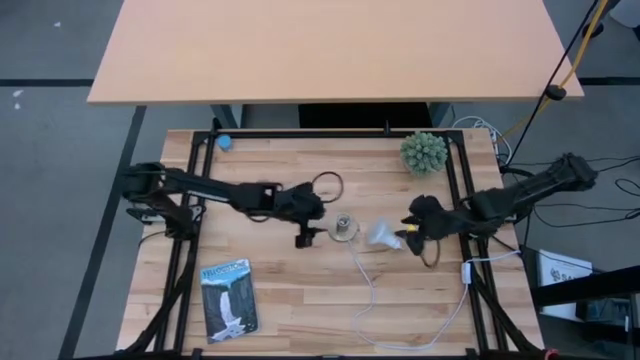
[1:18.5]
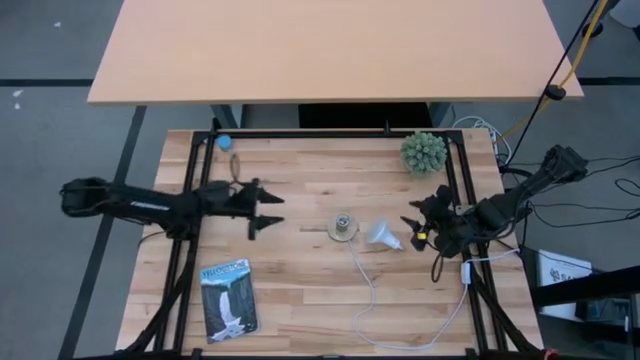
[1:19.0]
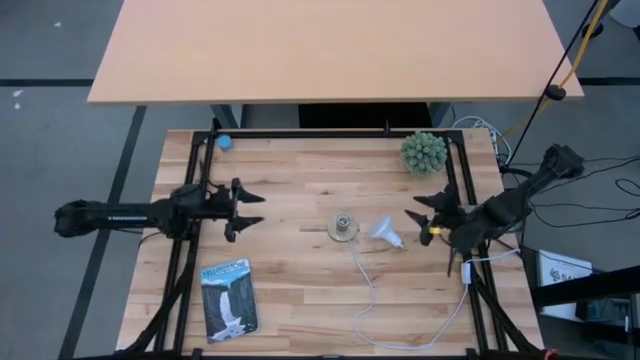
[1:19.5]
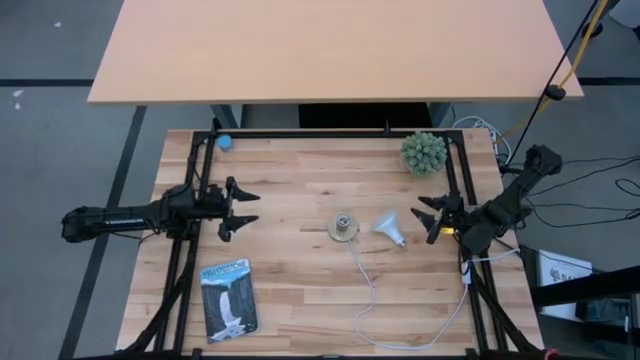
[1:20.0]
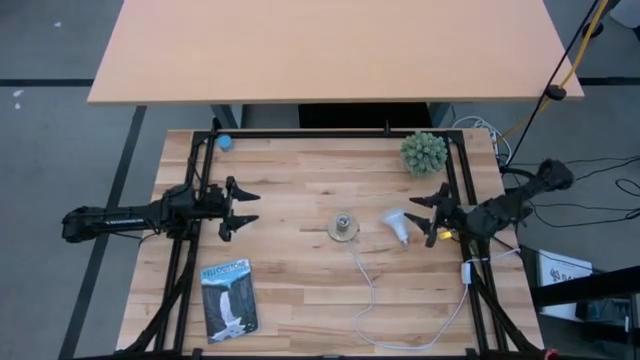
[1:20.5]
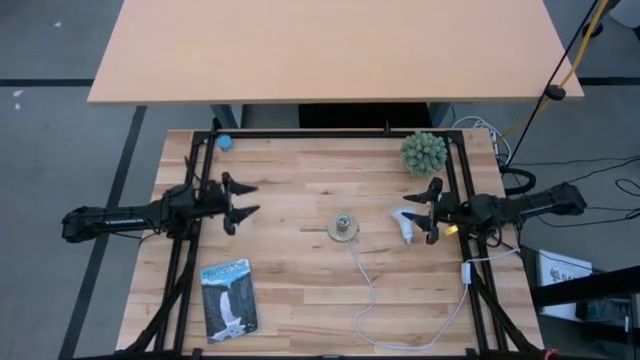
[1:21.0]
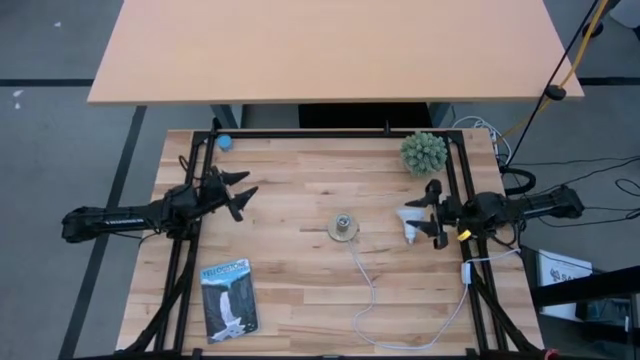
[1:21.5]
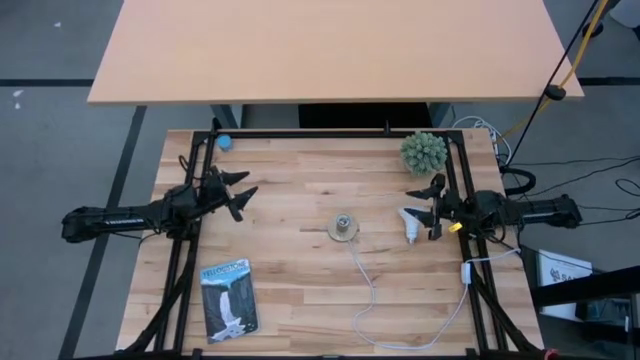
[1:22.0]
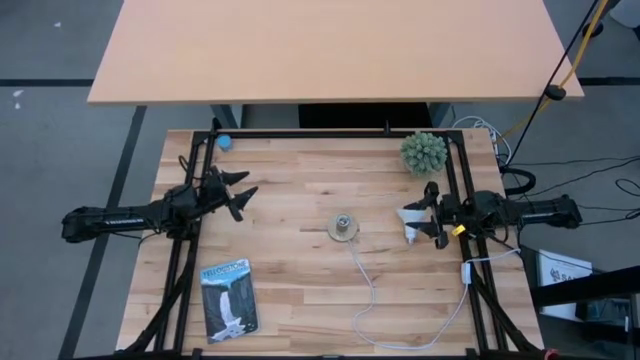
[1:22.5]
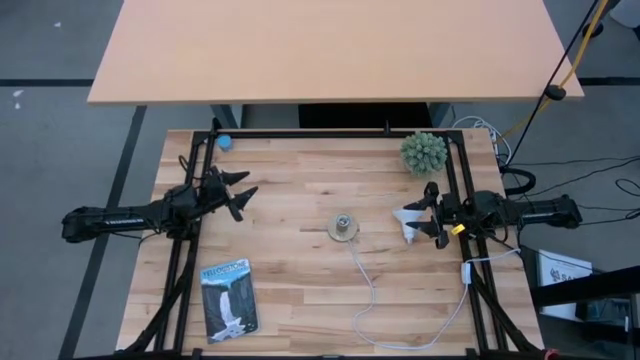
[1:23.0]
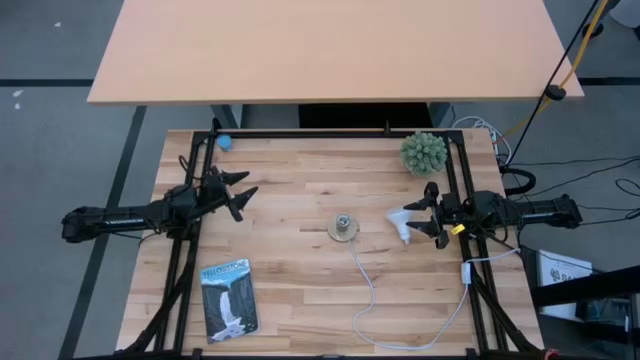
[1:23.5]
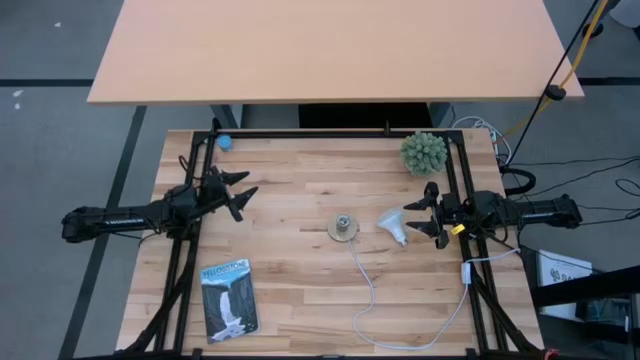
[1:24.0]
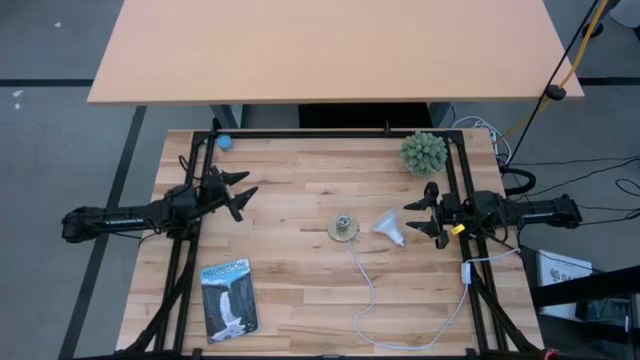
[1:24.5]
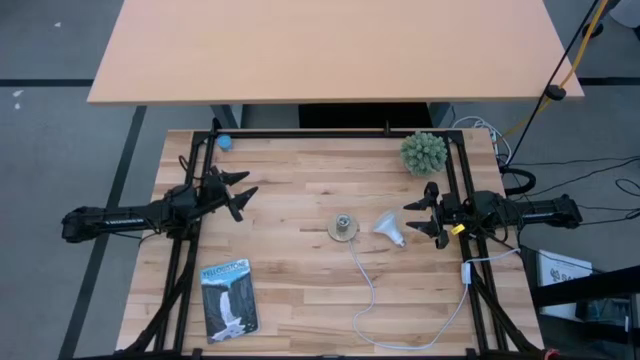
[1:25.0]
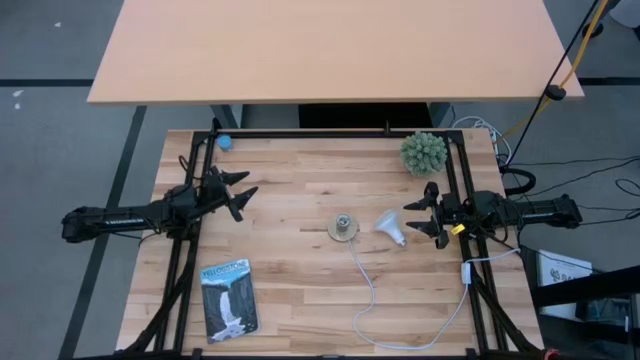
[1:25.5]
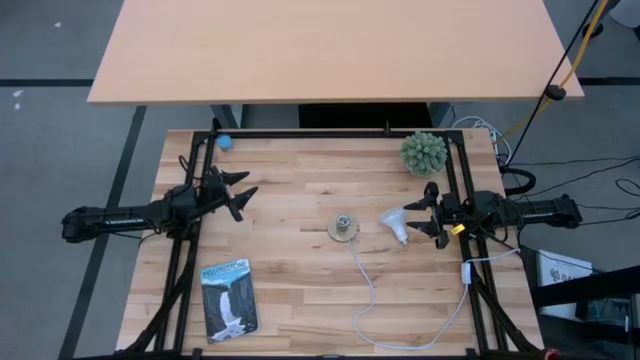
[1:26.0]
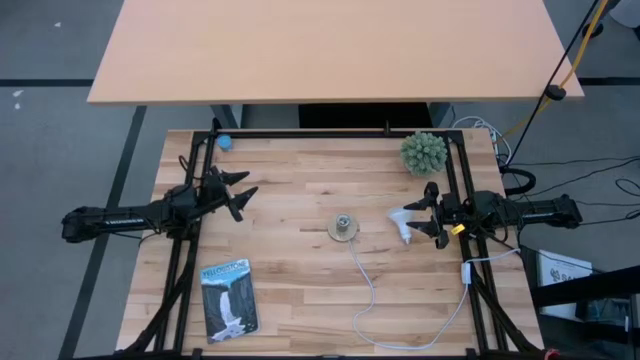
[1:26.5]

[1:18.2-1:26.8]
Task: Screw lightbulb
Return to Home Position

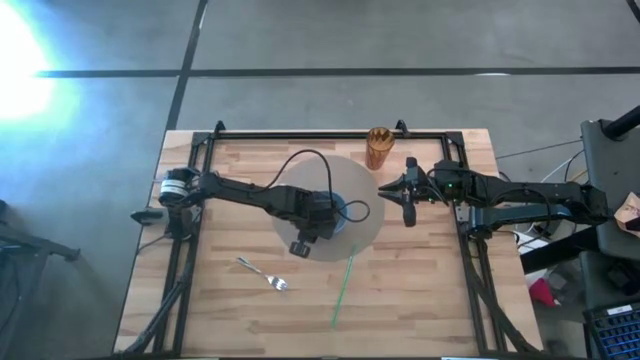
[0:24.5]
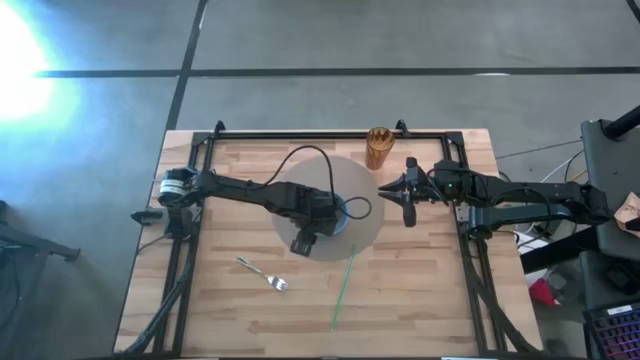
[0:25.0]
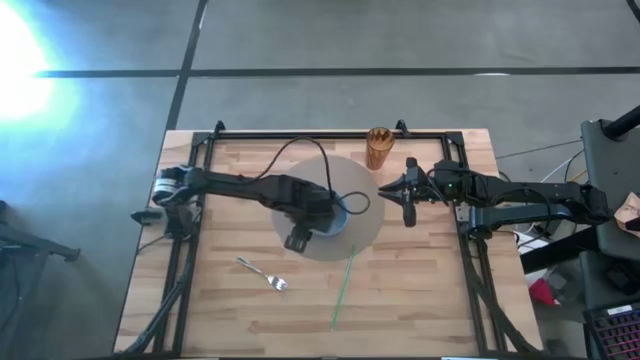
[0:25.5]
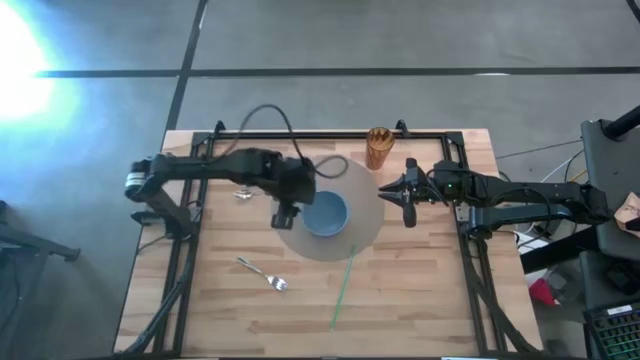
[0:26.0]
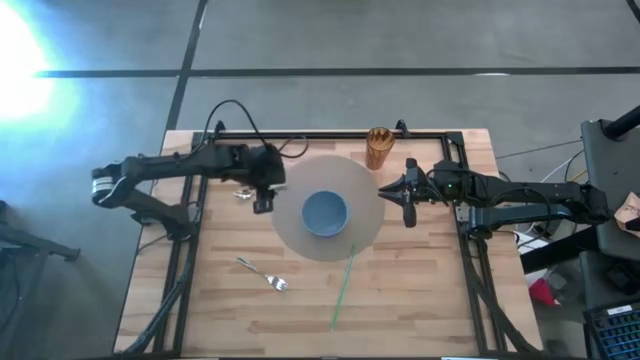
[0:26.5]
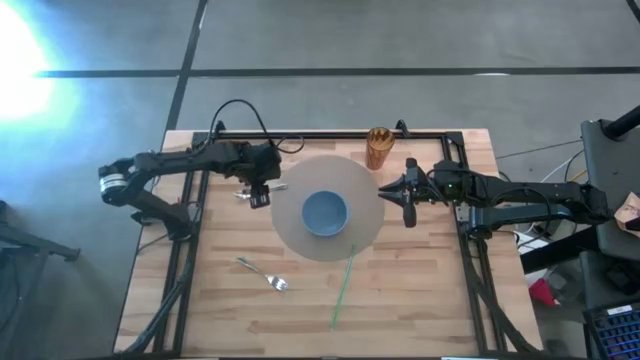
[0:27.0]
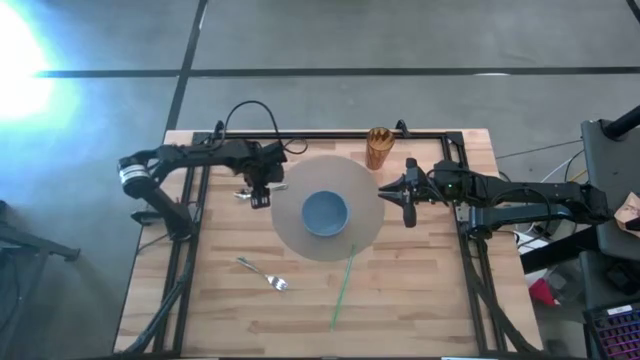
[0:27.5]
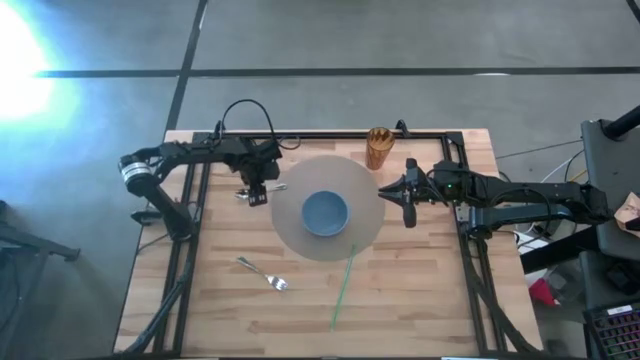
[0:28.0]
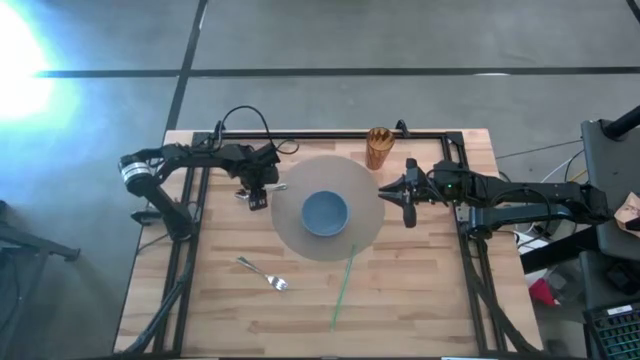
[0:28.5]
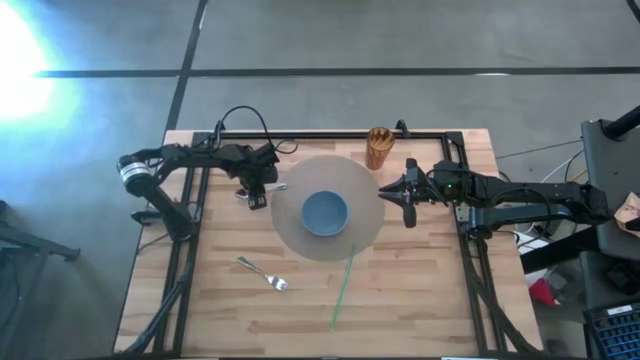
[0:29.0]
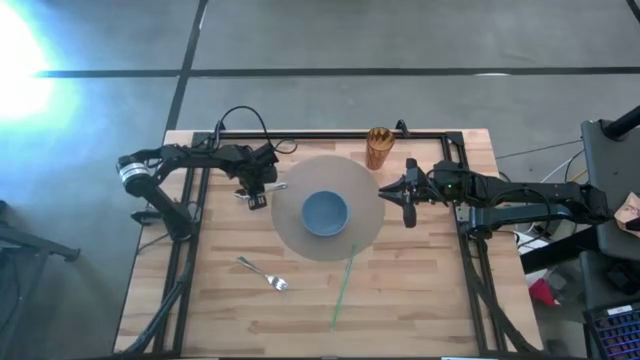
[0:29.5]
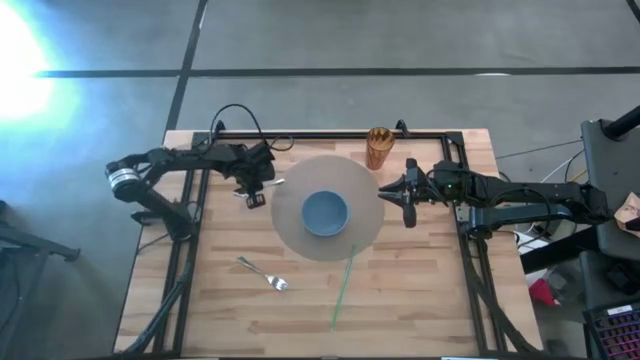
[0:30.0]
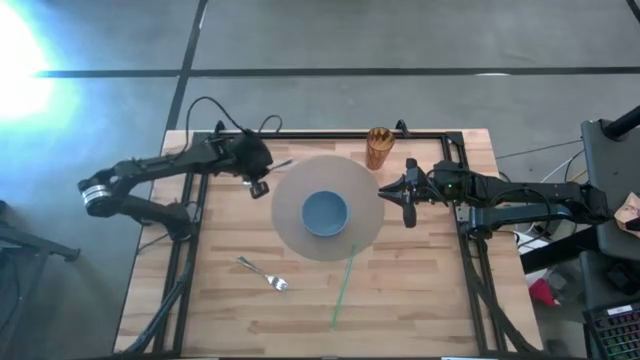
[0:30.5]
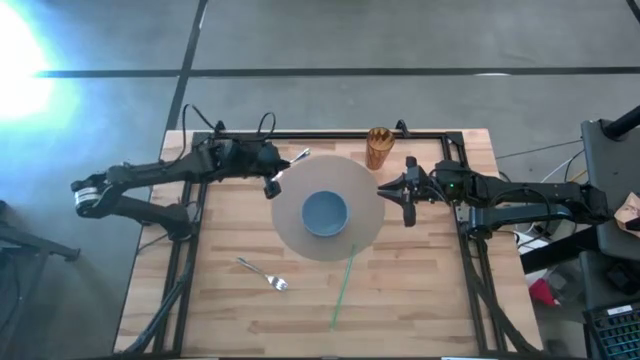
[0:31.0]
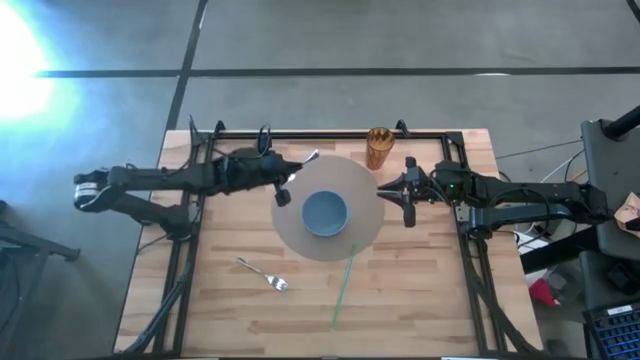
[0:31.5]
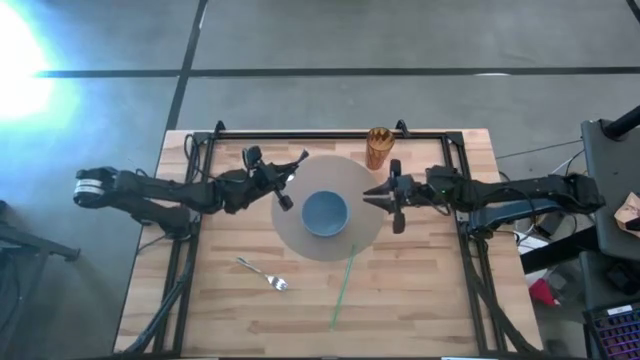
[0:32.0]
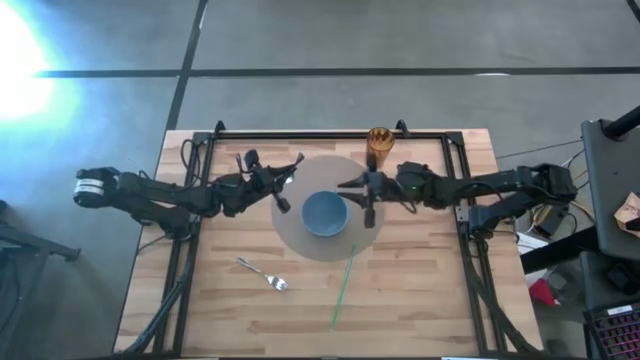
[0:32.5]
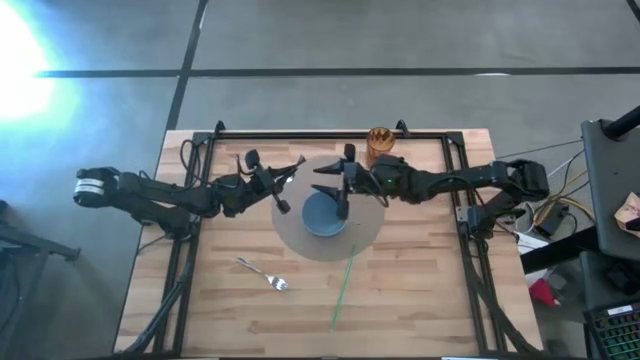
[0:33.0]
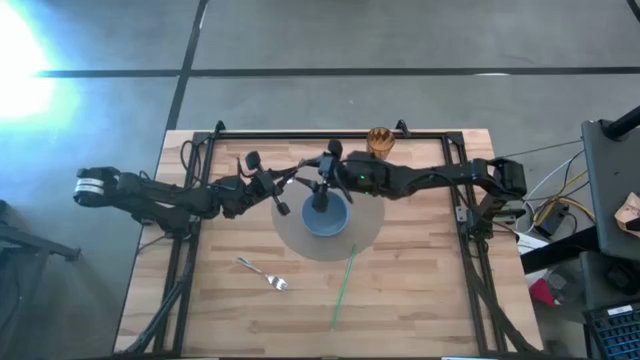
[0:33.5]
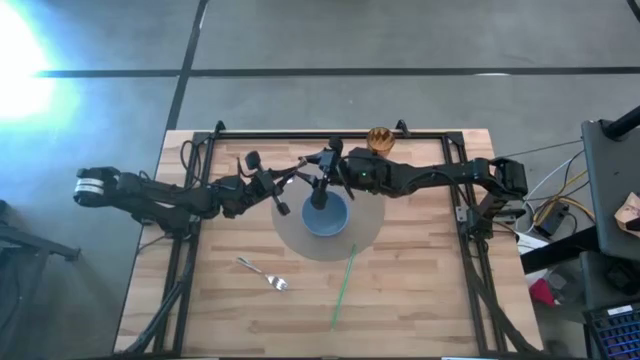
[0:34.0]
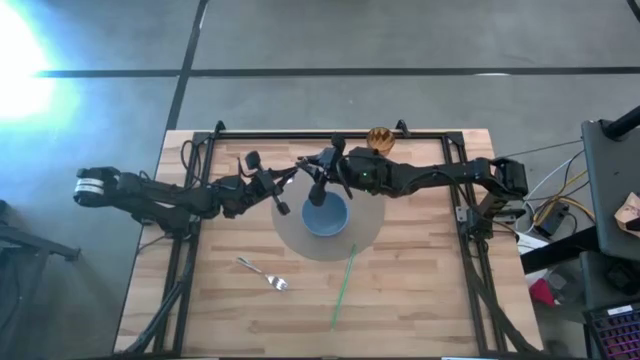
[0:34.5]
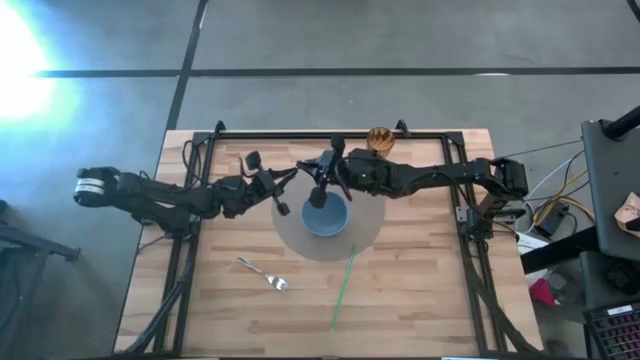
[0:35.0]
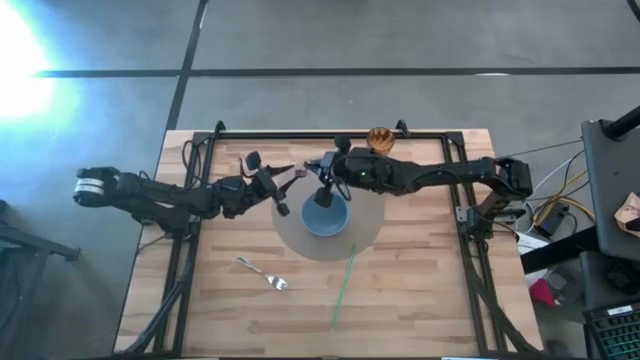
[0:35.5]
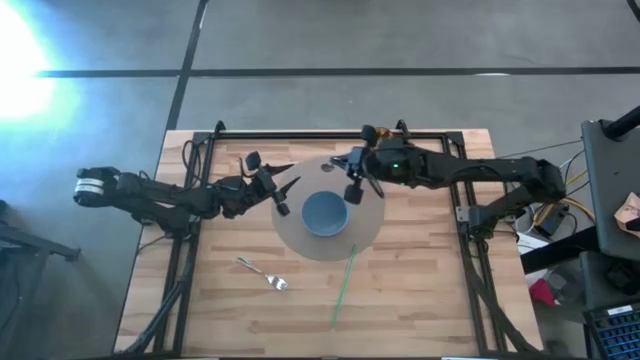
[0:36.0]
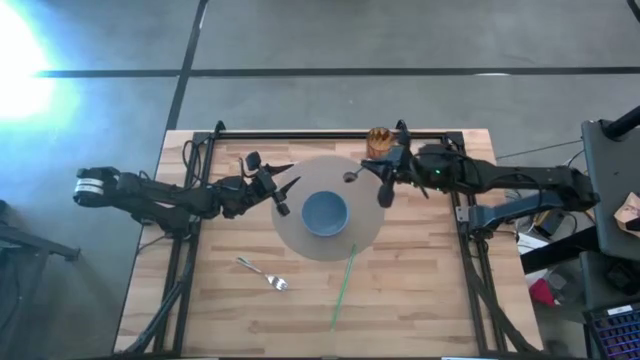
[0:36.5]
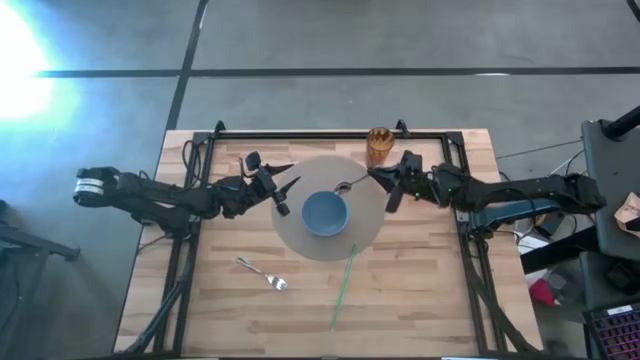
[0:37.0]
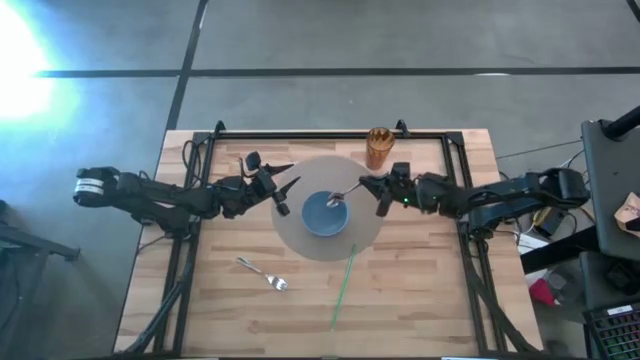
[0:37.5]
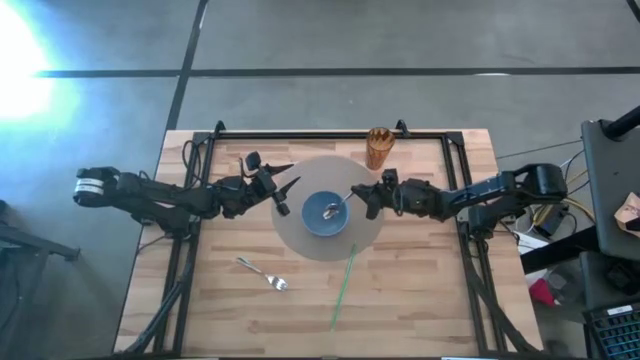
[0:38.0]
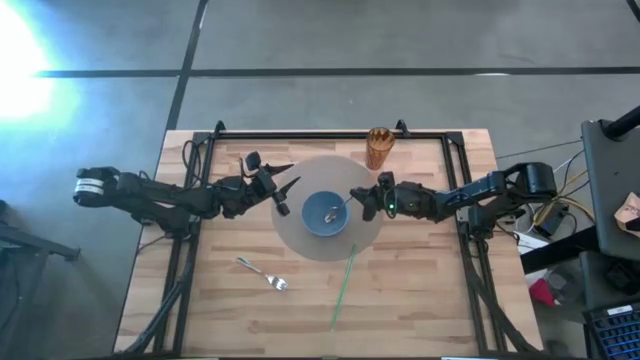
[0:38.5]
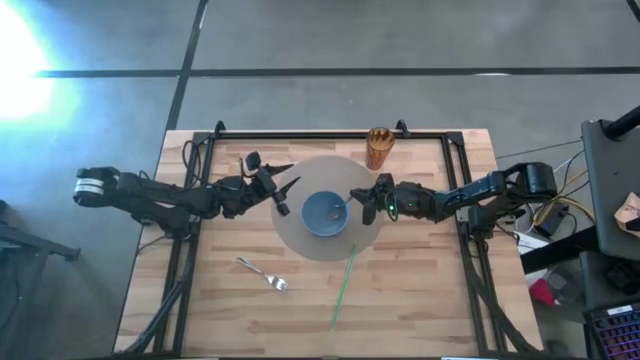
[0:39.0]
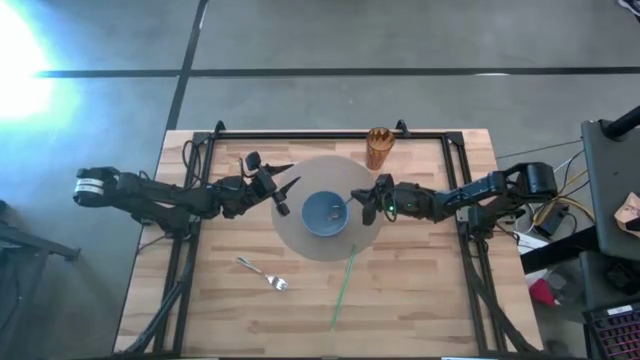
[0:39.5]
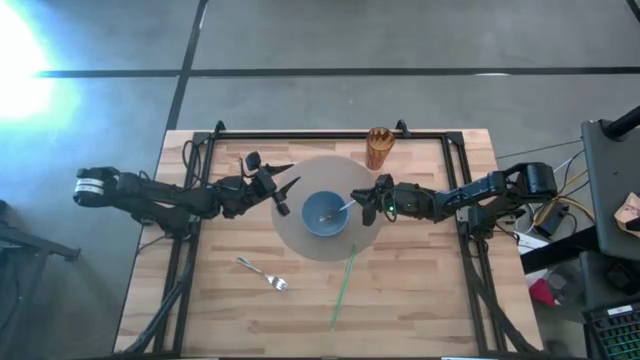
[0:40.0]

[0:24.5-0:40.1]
Task: Pick & Place Utensil
Put the spoon into the bowl
